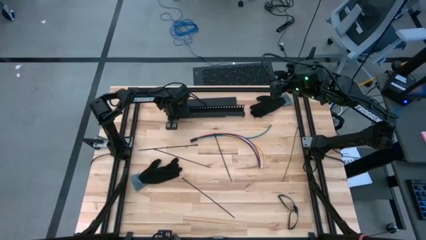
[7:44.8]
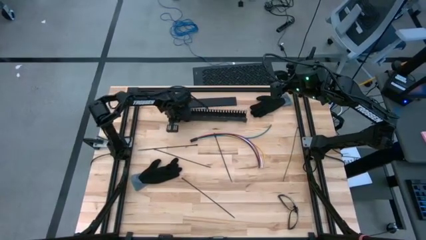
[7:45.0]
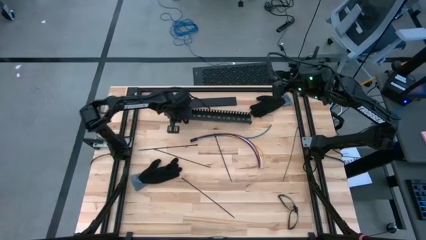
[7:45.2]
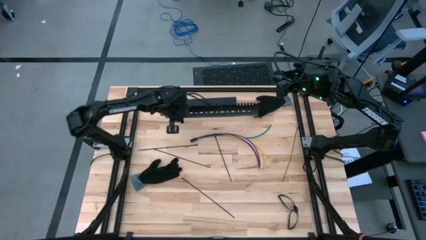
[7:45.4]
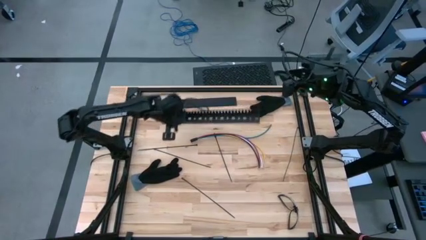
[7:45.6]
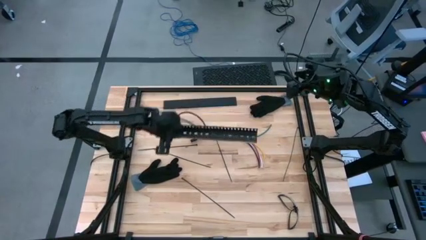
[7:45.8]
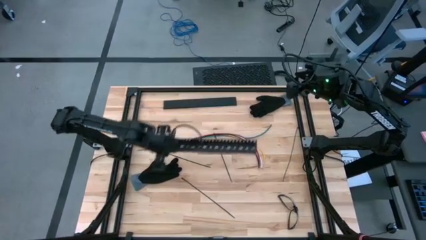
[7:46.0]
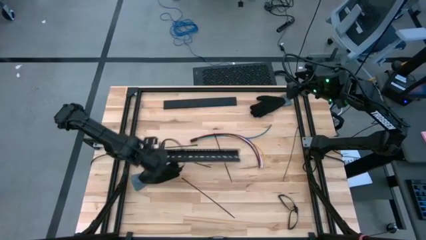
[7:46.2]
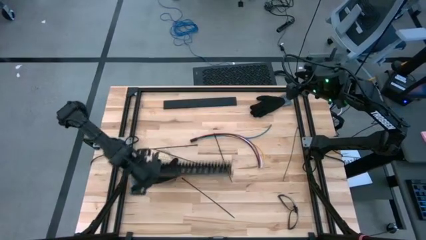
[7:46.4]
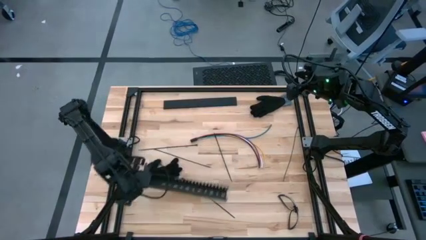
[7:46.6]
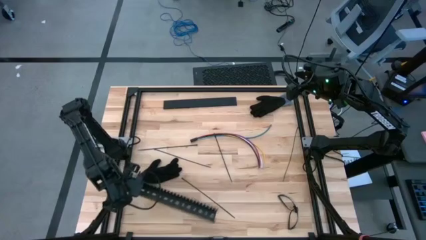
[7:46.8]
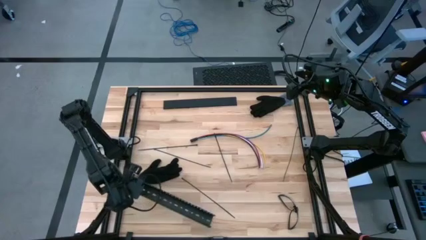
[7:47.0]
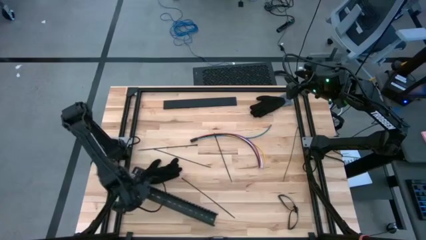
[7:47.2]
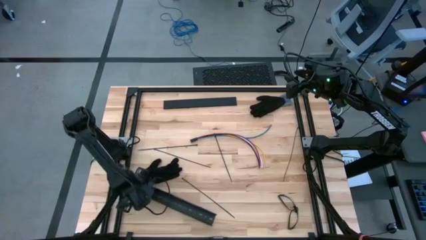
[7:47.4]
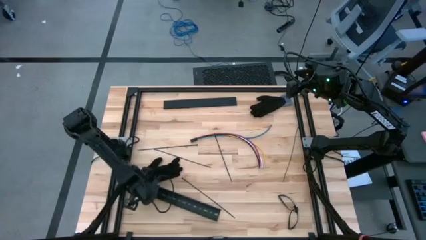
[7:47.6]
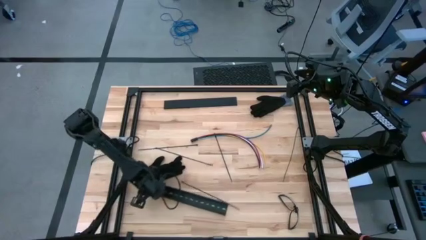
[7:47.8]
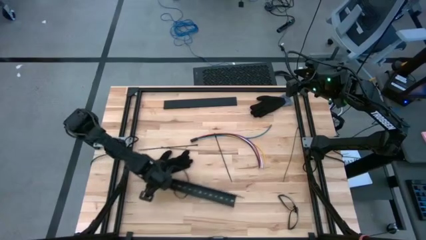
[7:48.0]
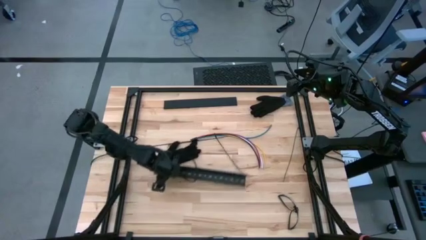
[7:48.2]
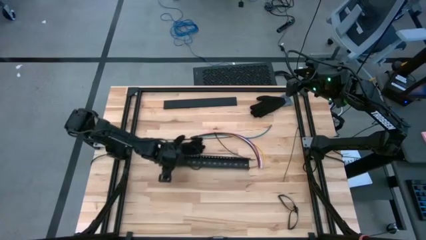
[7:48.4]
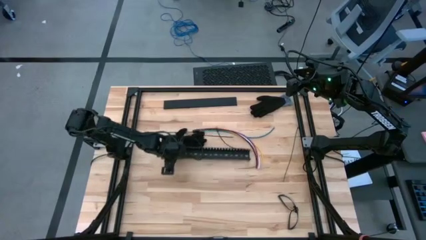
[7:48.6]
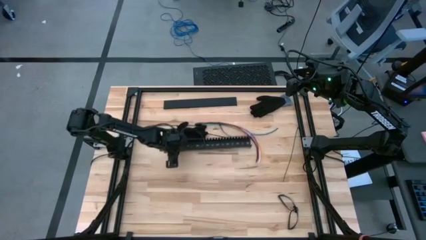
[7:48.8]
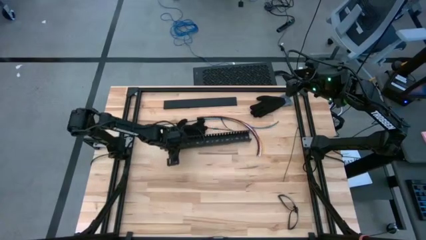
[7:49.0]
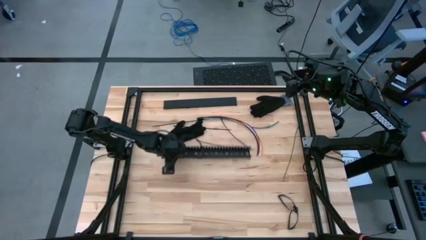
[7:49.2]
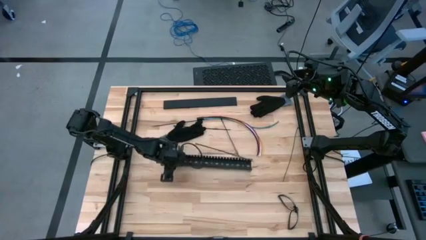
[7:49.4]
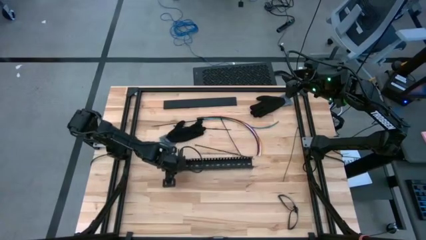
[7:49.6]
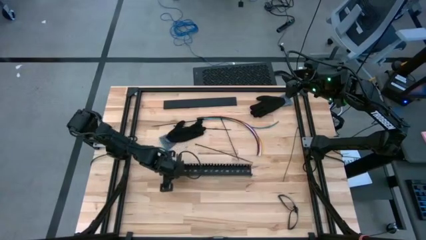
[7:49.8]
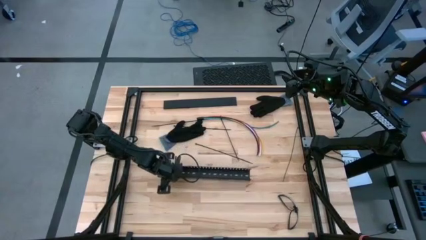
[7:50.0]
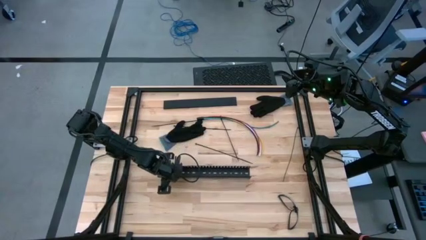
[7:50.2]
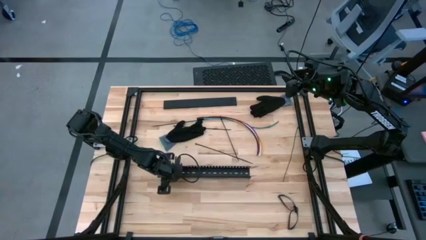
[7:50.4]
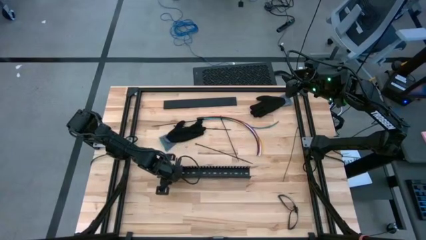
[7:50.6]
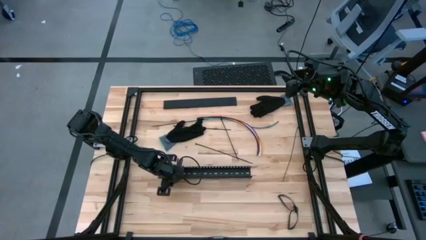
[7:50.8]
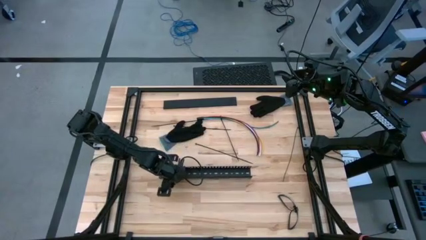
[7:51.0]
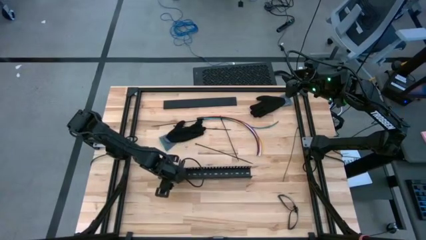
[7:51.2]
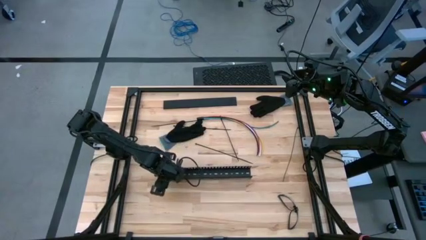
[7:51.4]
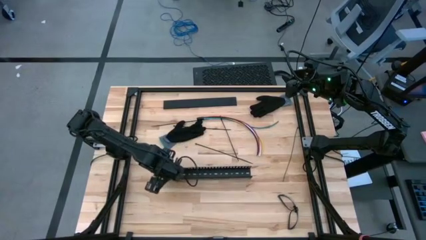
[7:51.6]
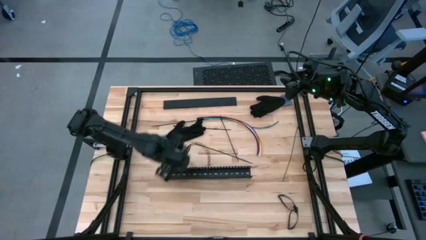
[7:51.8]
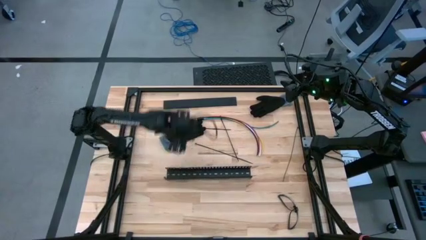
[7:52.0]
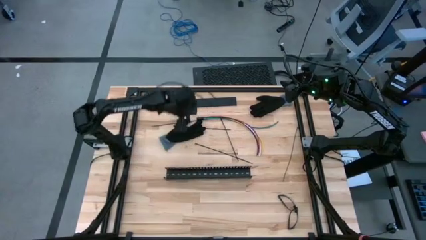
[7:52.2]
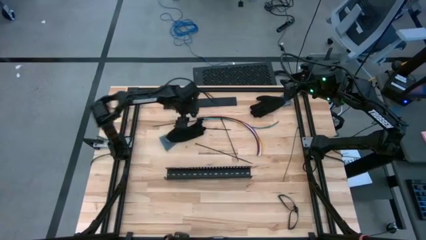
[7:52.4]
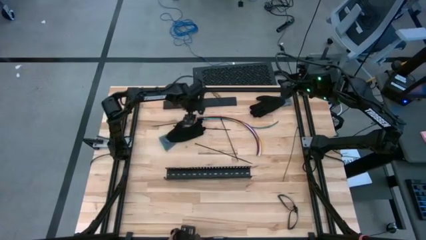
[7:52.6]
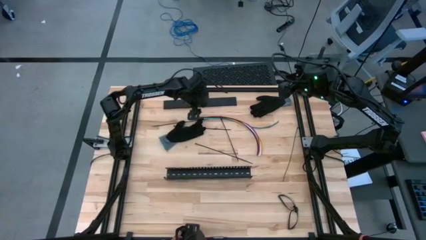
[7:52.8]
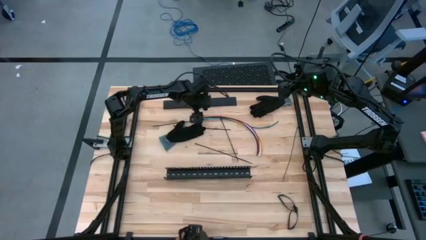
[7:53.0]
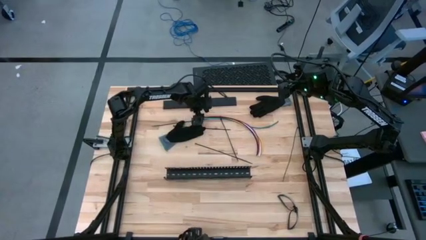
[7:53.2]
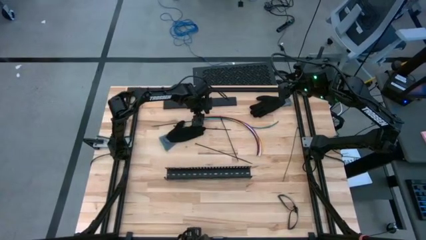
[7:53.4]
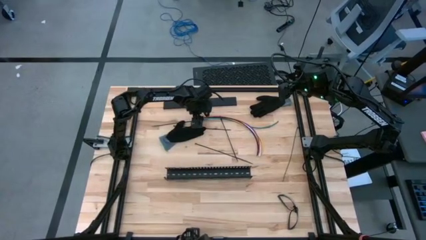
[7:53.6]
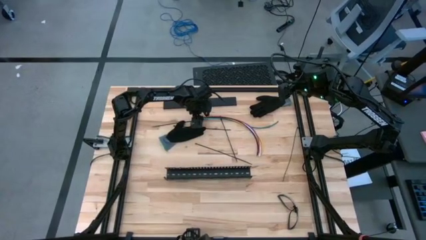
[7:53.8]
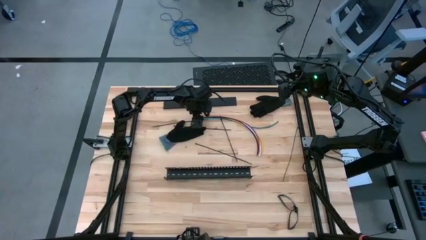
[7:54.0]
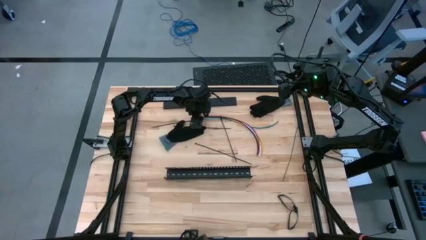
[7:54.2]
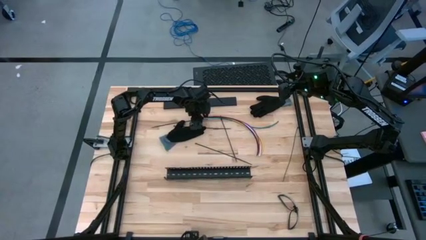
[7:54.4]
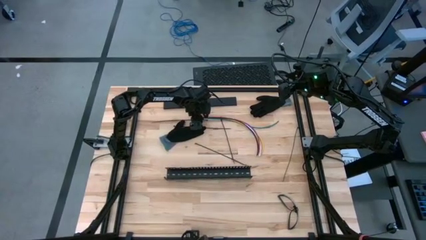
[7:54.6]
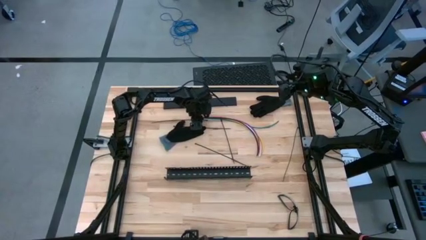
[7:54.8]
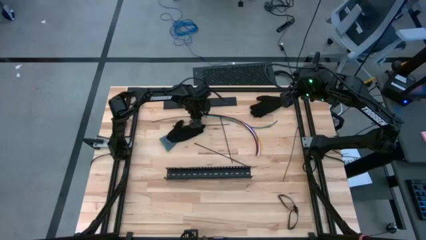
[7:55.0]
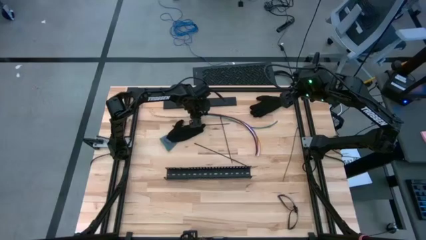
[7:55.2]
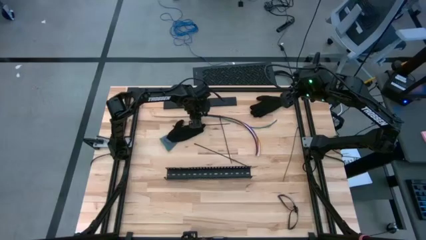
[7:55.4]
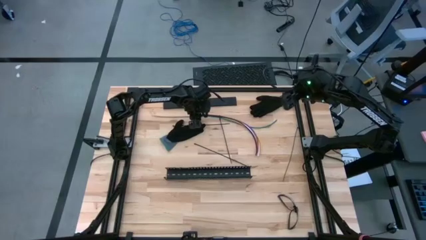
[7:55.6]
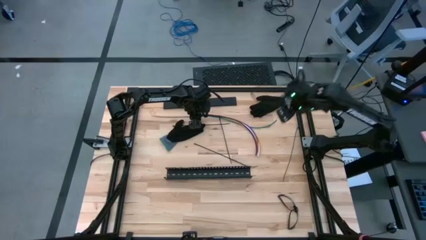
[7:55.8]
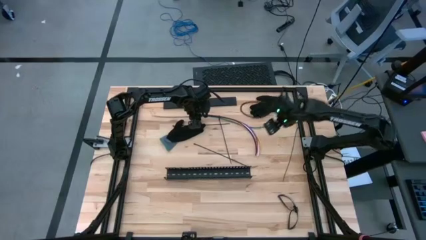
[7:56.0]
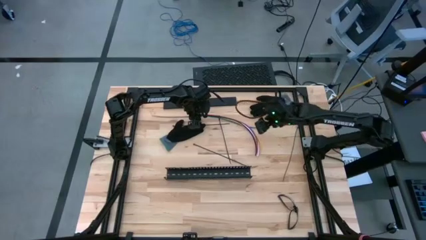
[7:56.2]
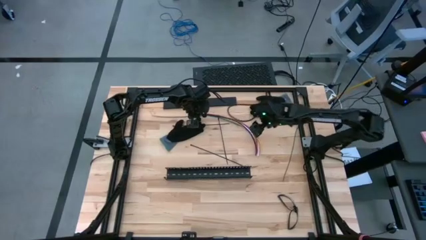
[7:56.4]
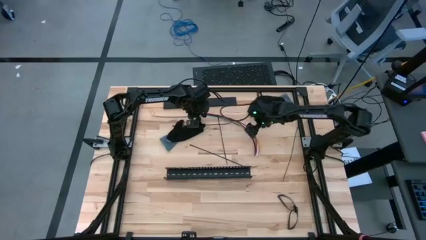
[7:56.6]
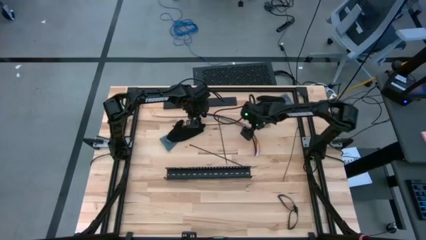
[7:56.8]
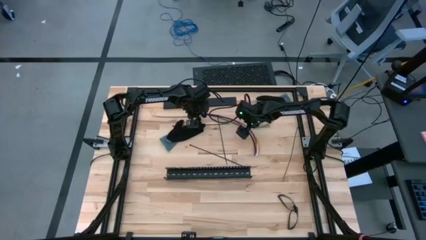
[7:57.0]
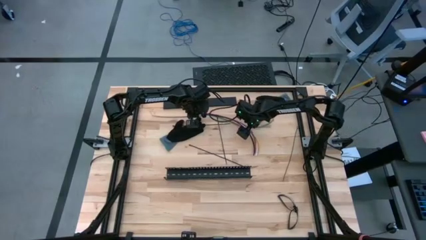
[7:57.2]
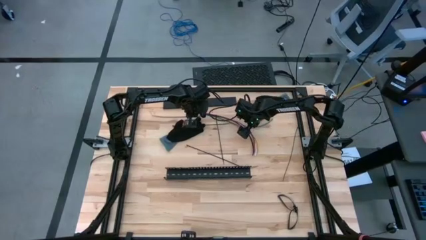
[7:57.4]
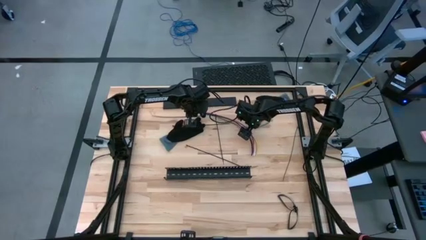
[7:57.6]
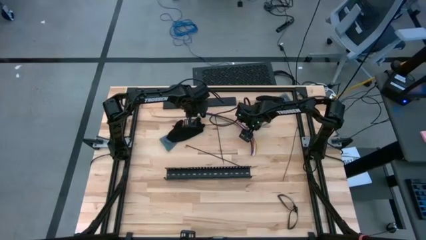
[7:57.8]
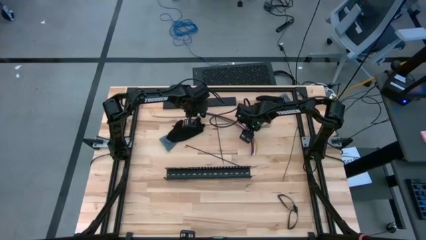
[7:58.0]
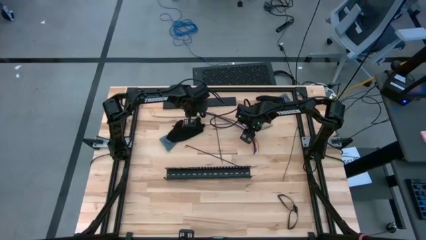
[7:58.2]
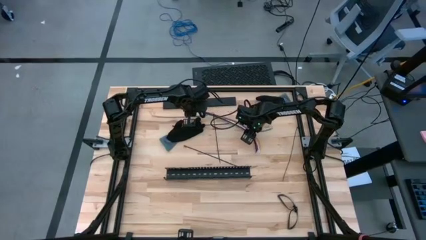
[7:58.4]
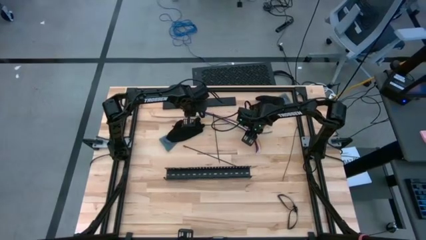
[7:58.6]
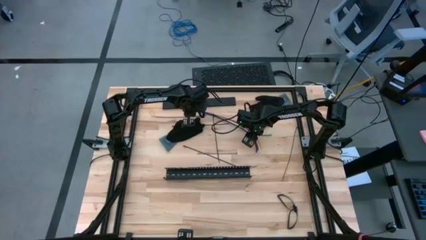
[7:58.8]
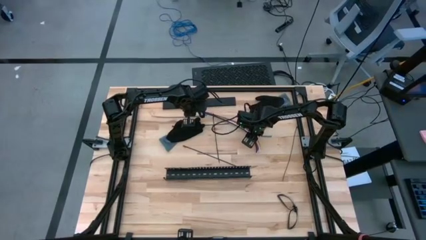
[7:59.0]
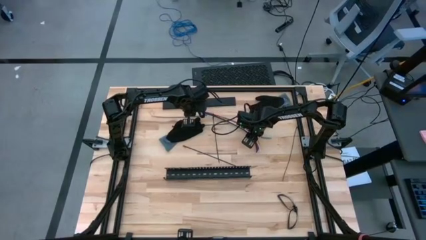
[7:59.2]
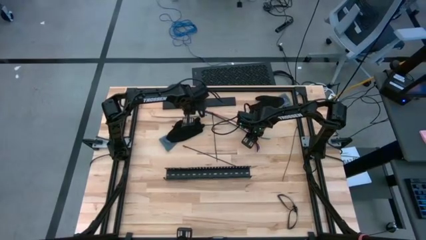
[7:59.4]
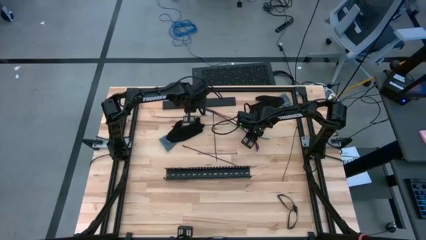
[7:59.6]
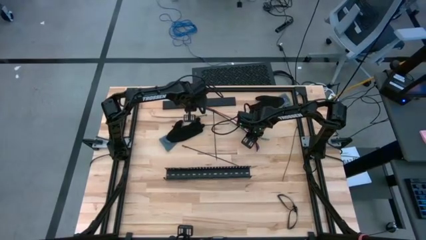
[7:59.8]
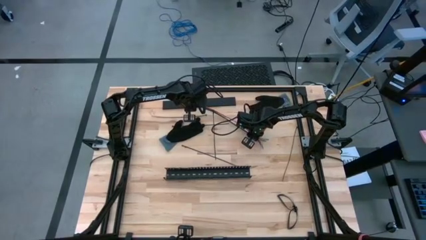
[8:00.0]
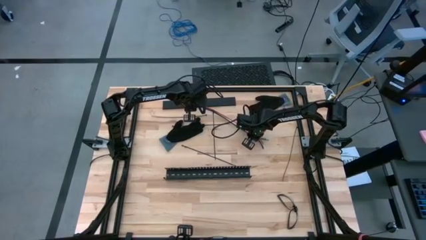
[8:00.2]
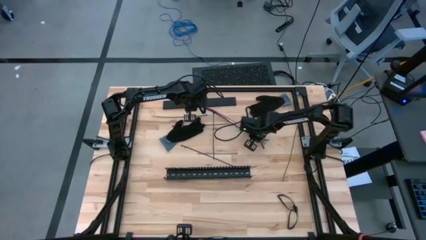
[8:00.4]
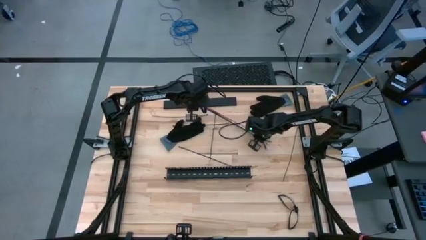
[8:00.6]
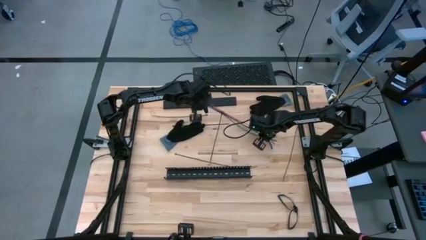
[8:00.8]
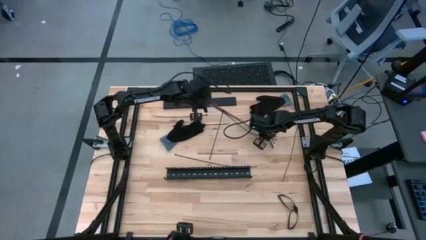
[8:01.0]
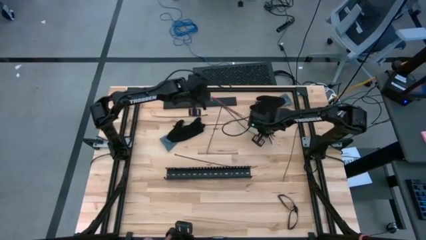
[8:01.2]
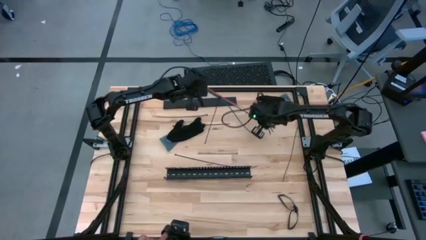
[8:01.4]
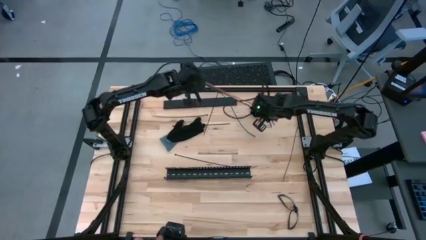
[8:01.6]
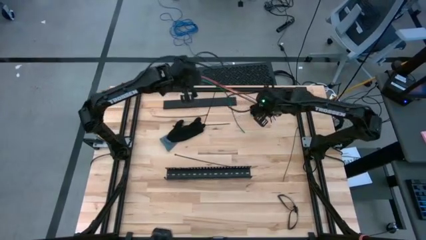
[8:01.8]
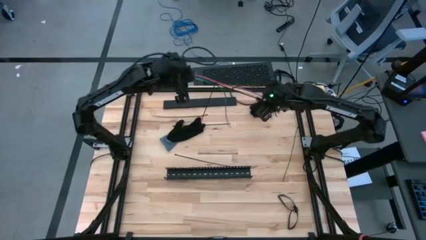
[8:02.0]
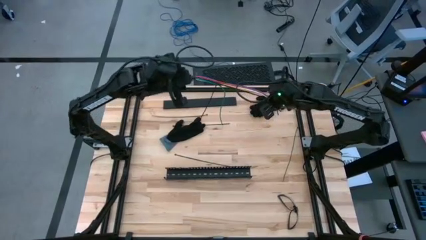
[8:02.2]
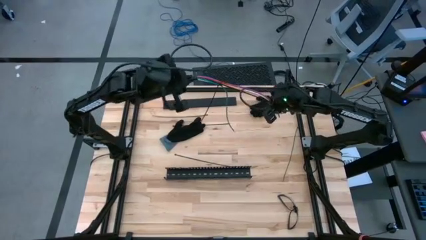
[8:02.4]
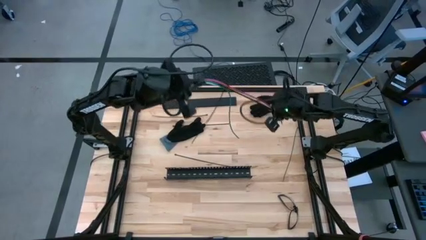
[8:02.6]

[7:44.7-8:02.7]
Task: Ziptie cables
Put the zip tied cabled wires into the cable duct
